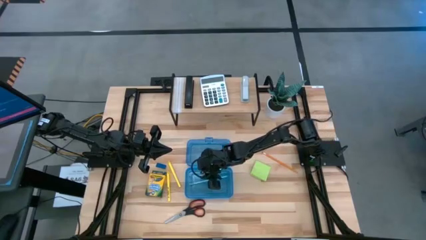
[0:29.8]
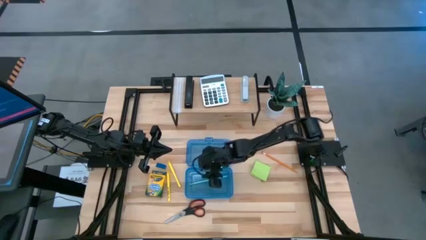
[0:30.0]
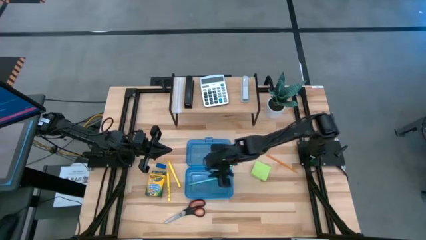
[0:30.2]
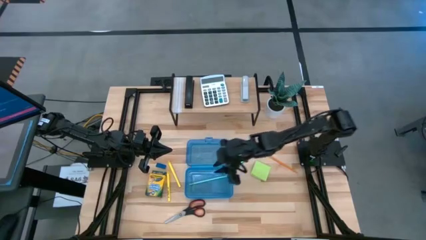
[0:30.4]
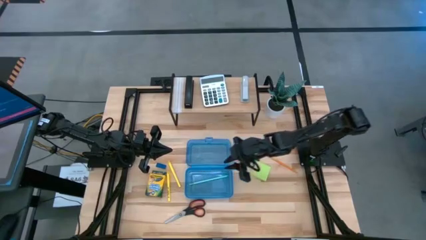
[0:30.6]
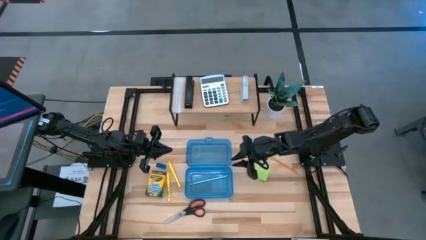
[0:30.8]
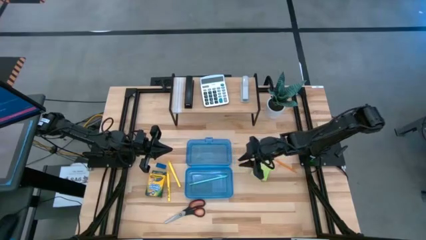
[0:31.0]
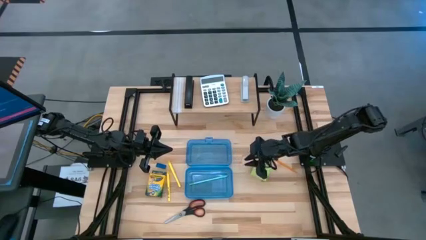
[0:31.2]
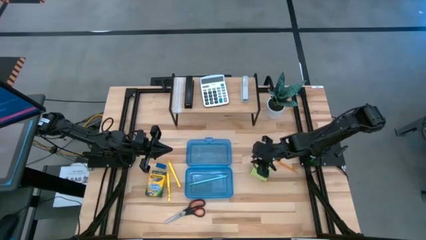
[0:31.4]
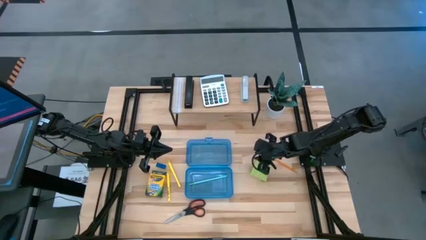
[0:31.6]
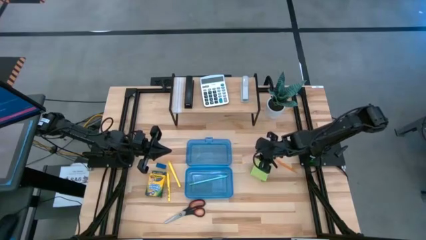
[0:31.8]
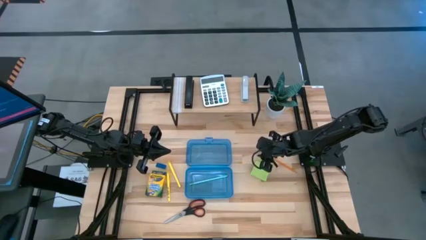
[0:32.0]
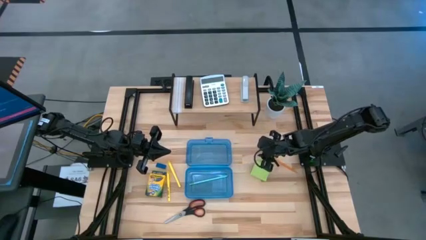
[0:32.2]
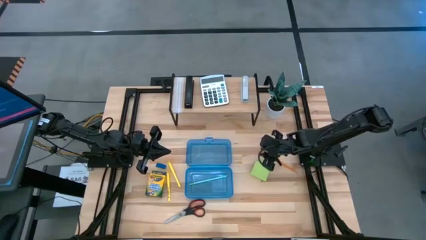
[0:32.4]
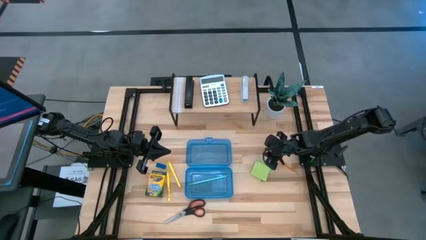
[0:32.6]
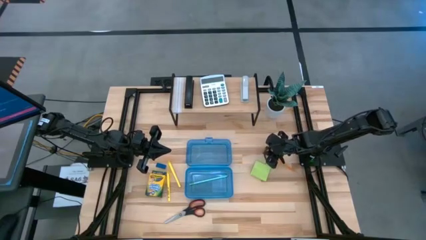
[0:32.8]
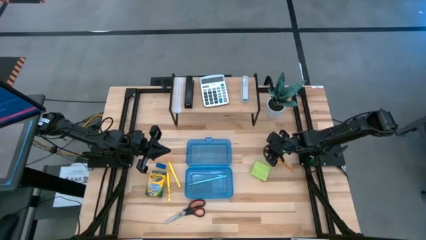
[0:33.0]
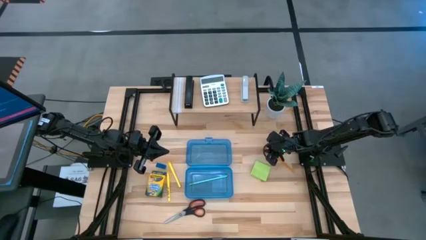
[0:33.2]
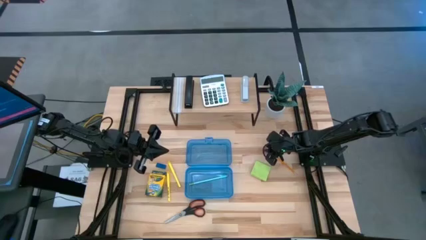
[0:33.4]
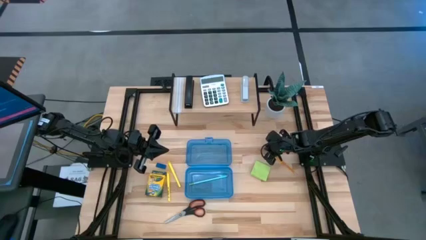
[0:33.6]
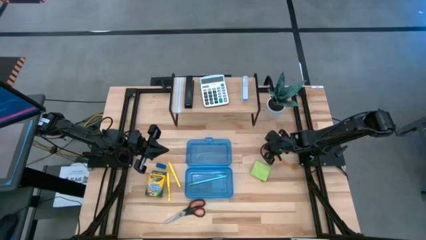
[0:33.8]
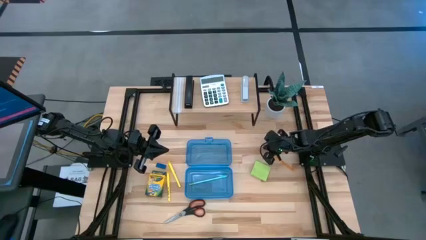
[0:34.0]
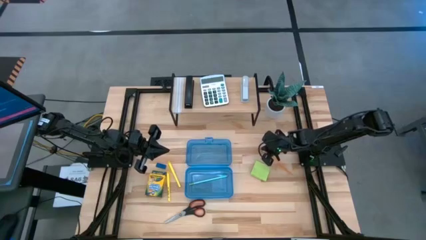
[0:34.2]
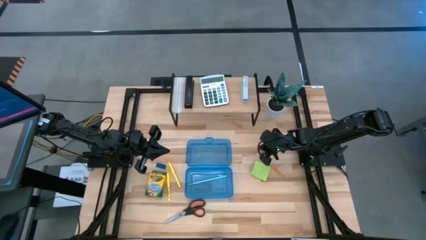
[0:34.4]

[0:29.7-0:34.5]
Task: Pack school essentials
Put the yellow pencil into the blue supply box

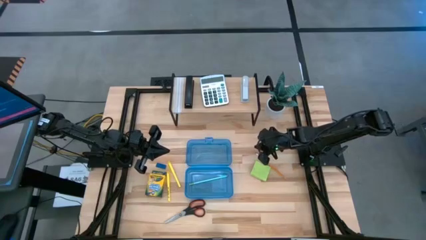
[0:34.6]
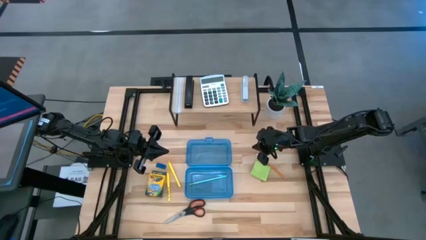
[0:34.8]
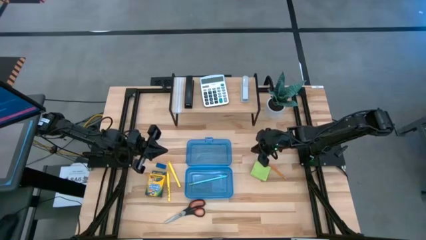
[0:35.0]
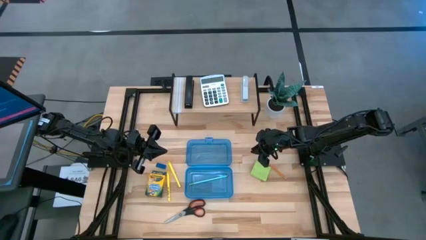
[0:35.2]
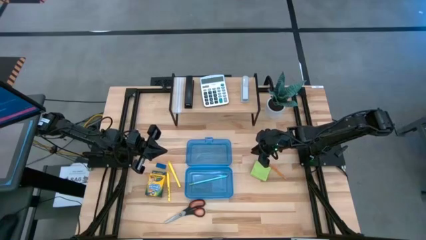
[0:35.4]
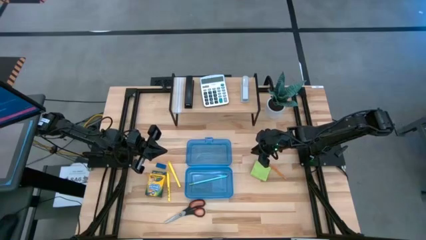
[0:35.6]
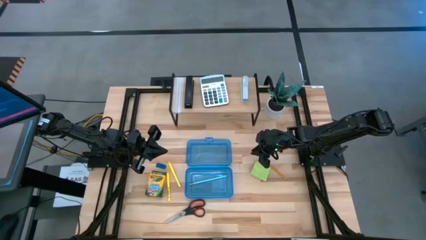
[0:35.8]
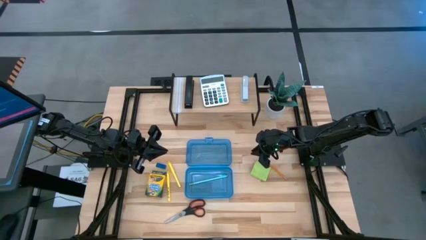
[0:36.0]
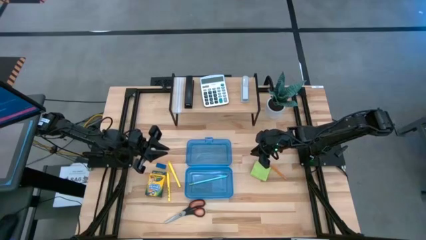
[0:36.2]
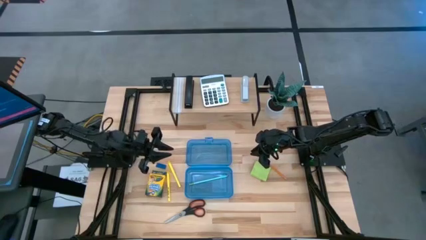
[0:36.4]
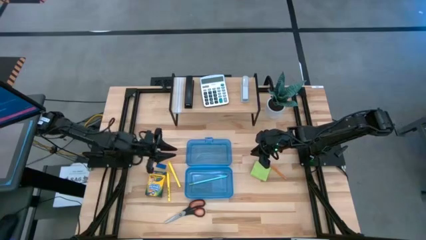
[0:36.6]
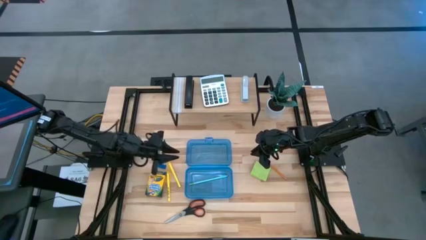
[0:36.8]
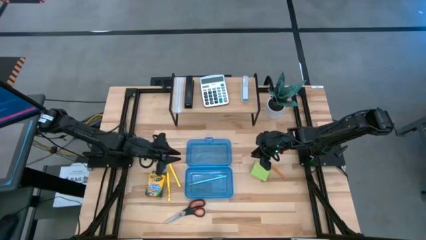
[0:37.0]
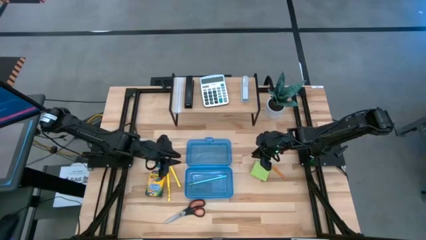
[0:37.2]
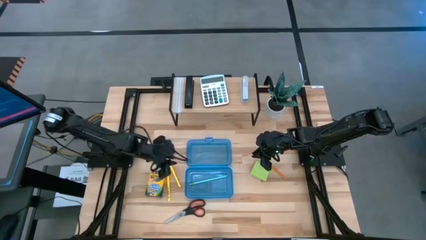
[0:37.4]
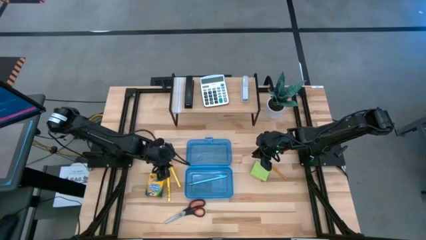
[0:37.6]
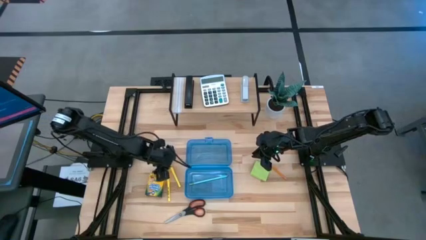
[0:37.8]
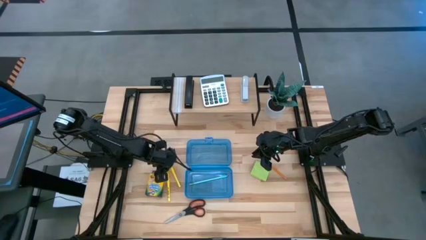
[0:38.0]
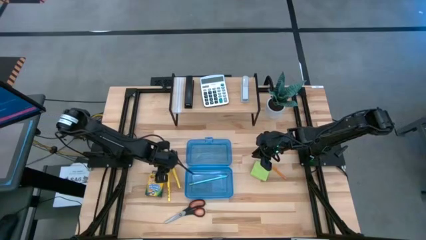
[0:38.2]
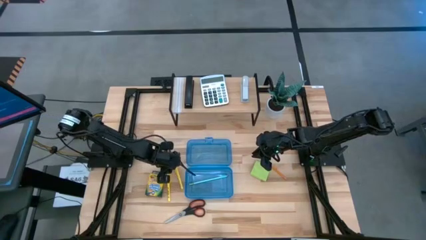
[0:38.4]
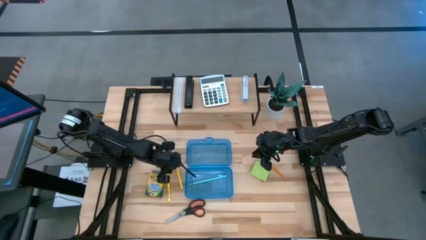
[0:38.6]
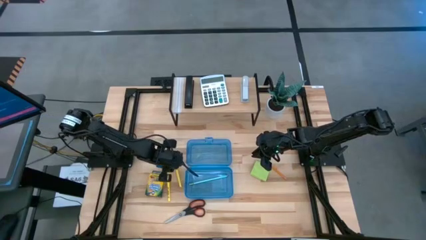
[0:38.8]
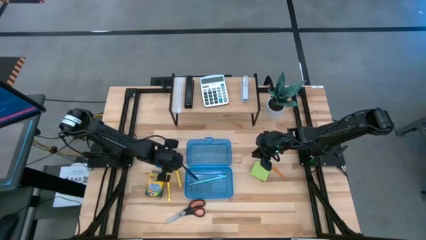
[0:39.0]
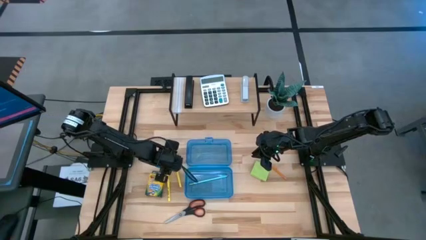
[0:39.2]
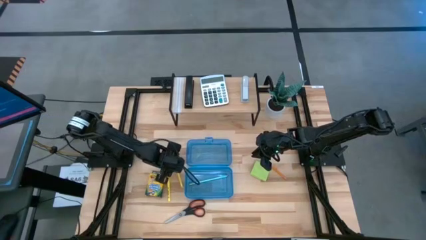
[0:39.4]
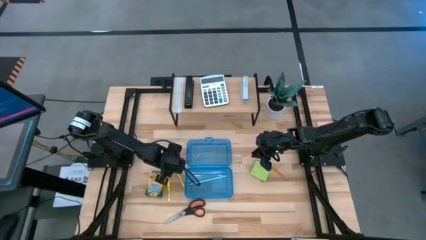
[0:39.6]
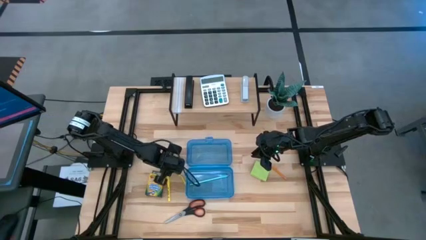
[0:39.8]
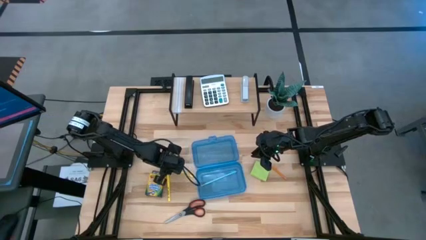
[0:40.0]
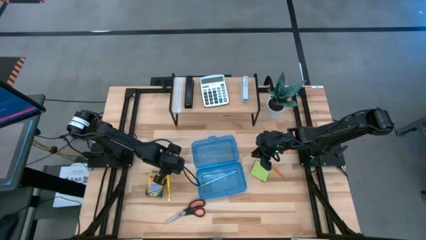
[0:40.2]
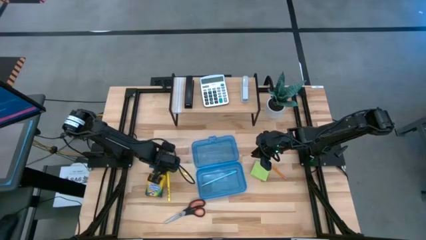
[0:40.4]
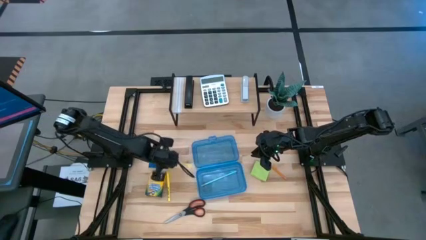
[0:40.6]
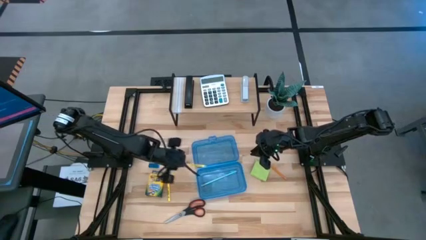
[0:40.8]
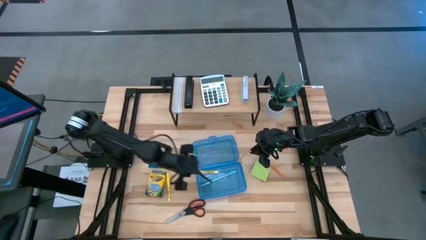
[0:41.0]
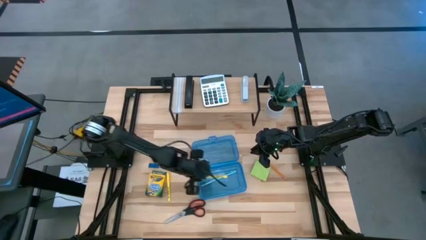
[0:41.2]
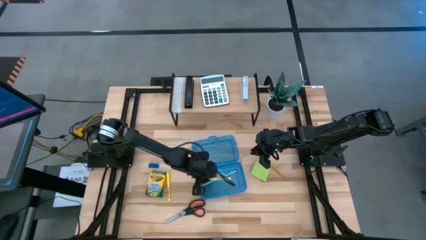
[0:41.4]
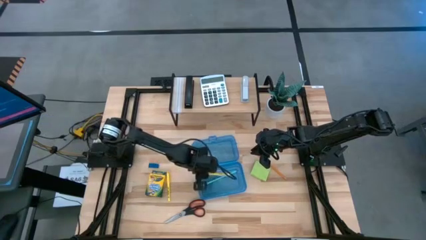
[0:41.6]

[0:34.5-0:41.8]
Put the yellow pen into the blue supply box

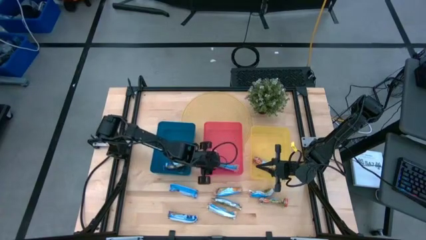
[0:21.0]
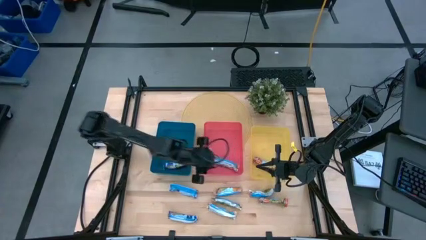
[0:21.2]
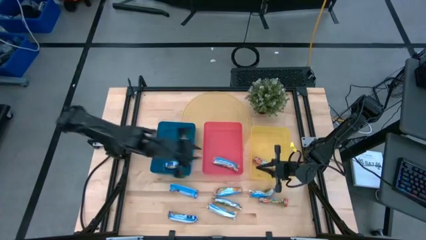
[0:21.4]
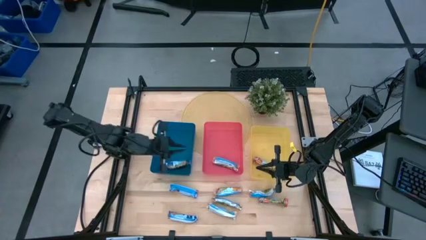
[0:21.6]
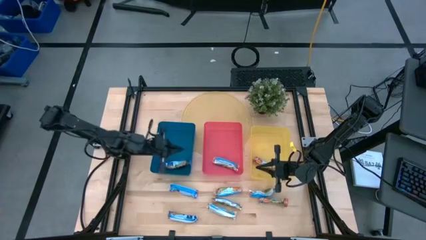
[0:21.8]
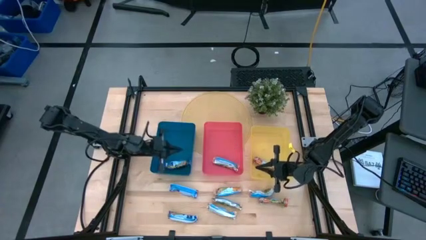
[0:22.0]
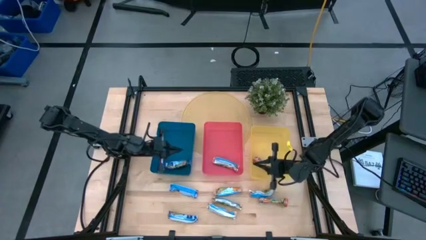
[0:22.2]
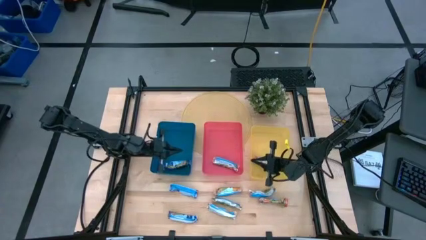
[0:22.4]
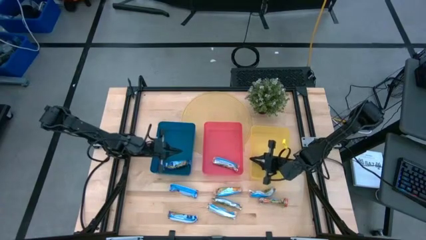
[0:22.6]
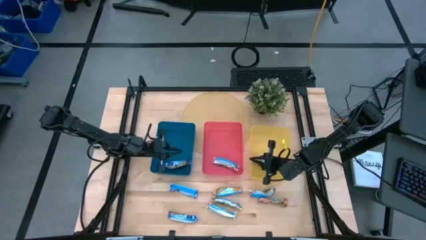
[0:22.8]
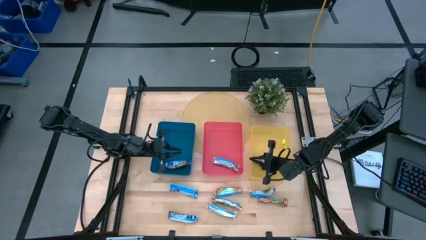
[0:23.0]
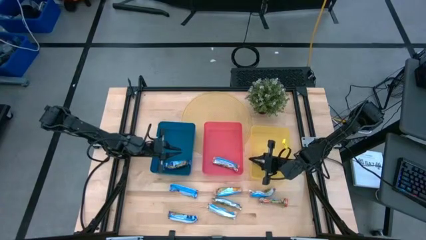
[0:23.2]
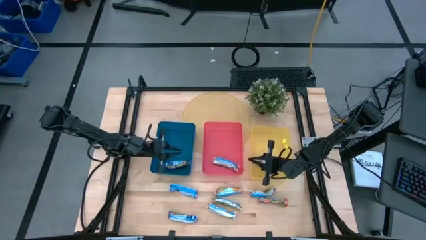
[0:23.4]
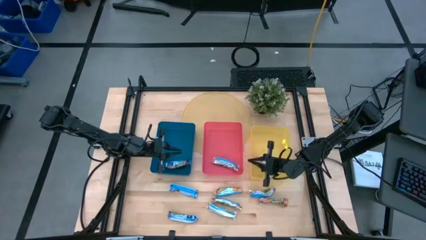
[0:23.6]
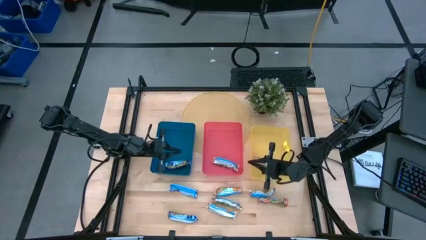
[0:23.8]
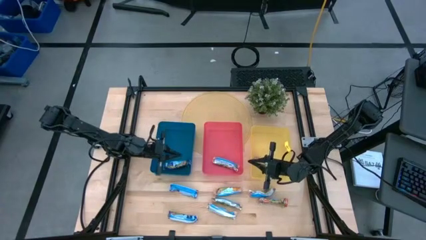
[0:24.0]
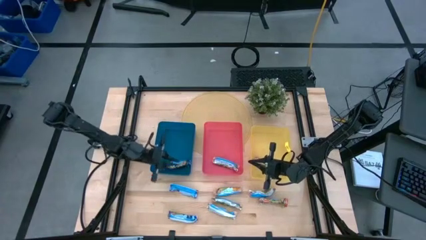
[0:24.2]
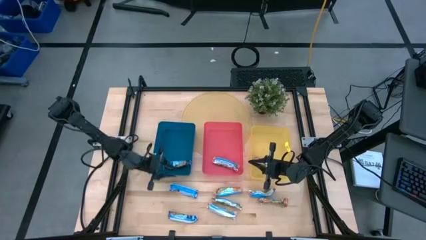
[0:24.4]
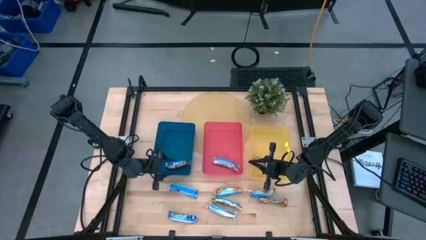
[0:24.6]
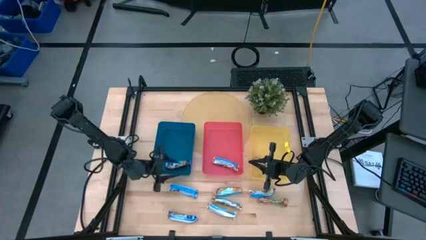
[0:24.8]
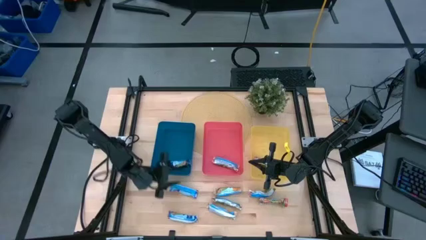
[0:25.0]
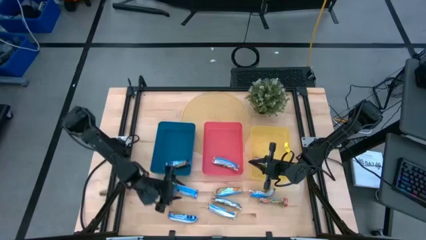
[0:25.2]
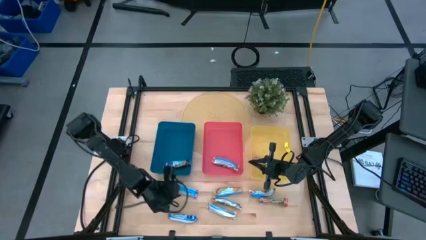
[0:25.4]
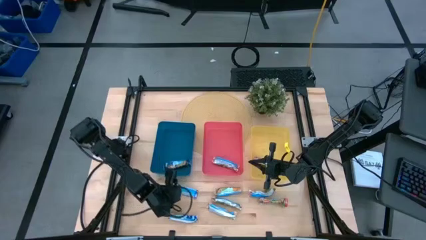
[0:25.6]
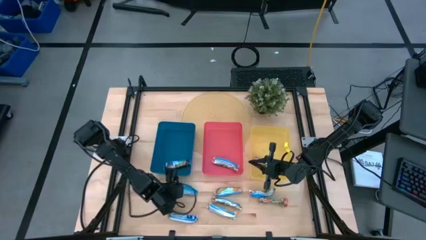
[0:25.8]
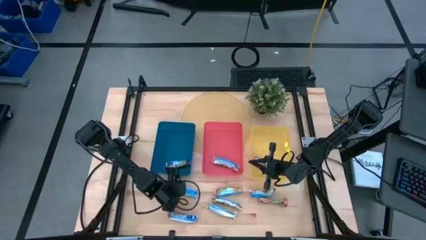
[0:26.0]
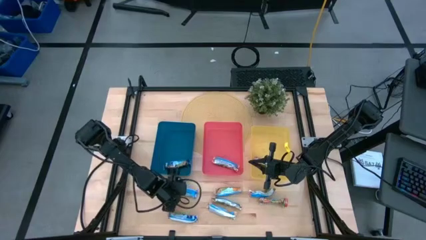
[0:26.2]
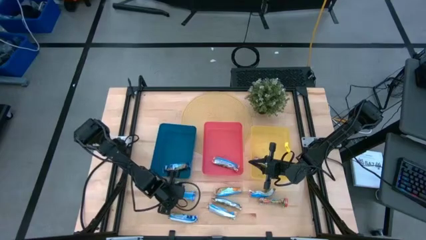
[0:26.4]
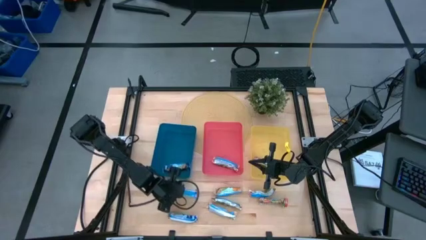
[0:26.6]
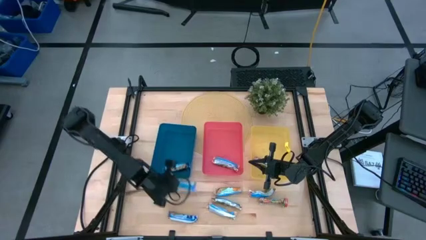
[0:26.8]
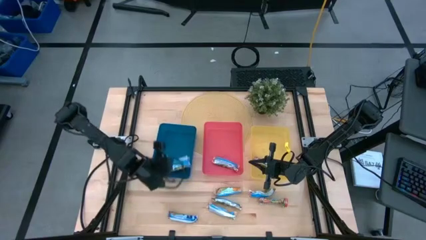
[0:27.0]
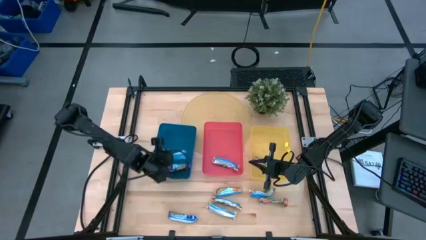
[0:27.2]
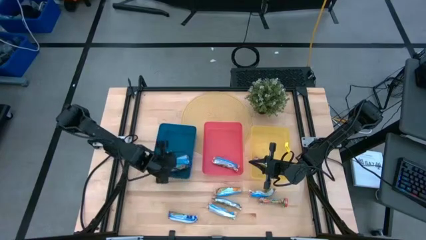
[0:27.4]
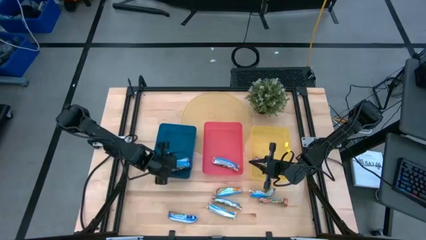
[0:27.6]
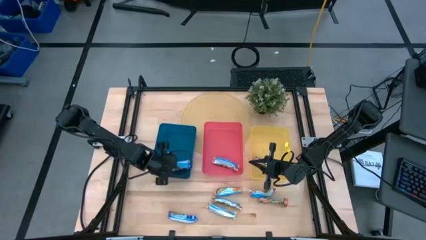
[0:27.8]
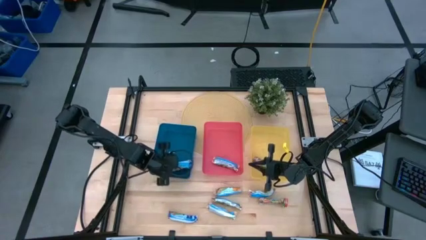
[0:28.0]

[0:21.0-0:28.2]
Task: Pick and place Granola Bars by type
Put the blue granola bar into the blue bin
